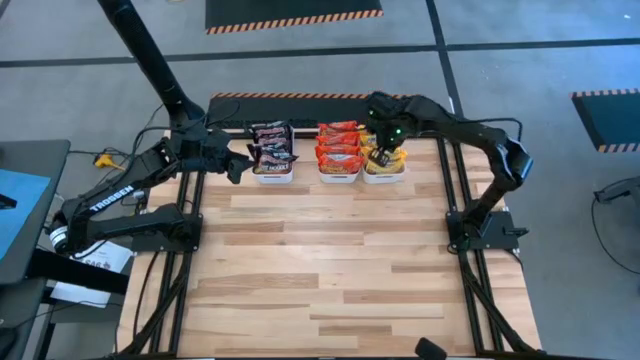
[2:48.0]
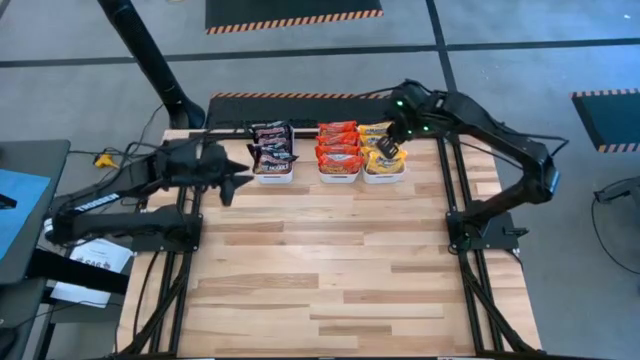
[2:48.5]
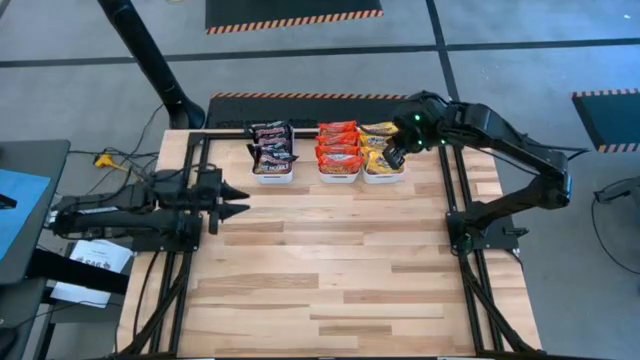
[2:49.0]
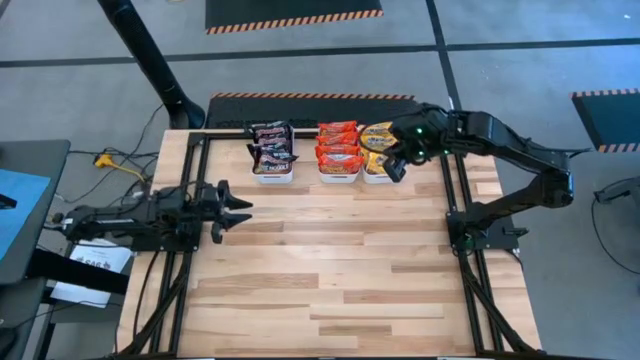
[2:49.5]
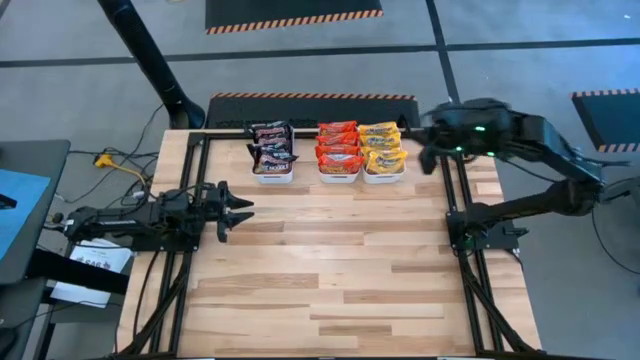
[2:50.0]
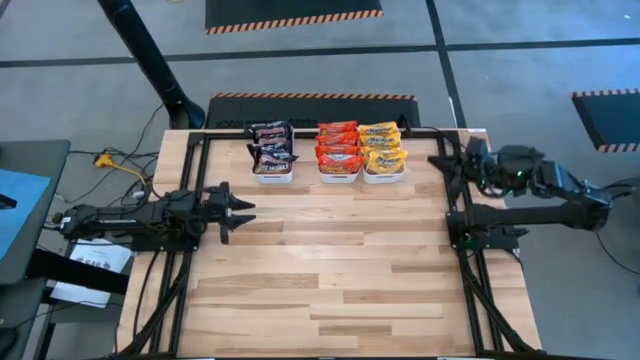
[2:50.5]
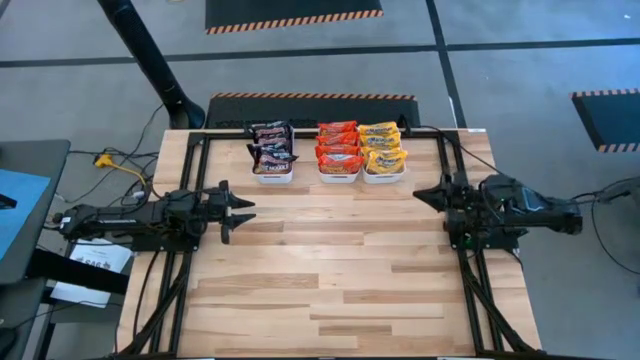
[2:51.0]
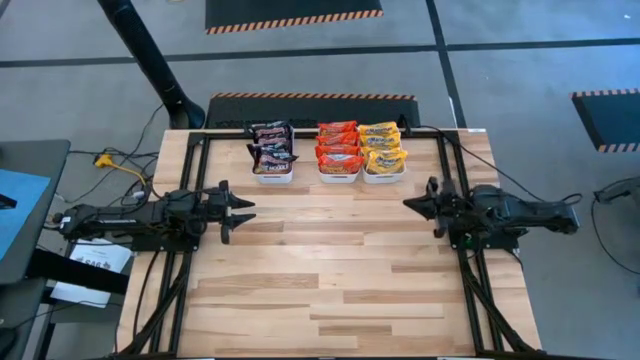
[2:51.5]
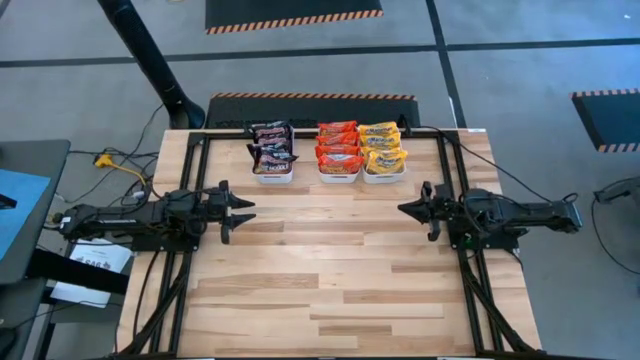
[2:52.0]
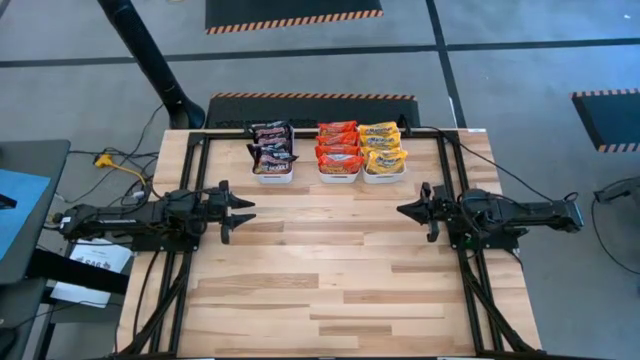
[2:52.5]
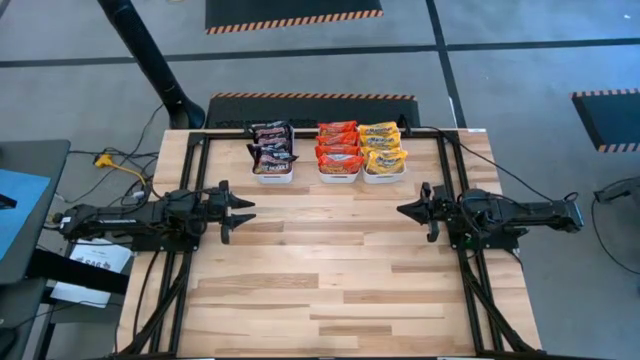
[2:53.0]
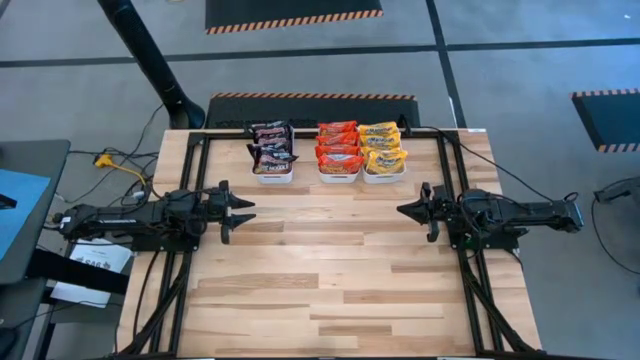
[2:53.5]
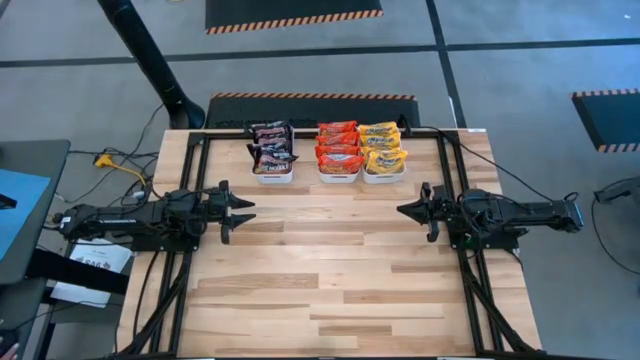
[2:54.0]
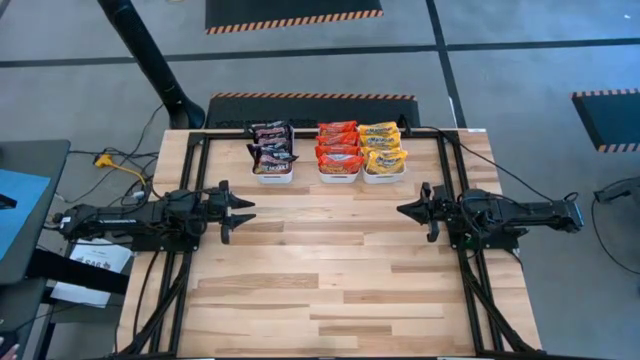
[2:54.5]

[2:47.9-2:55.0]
Task: Sort Maruchan noodles
Return to Home Position

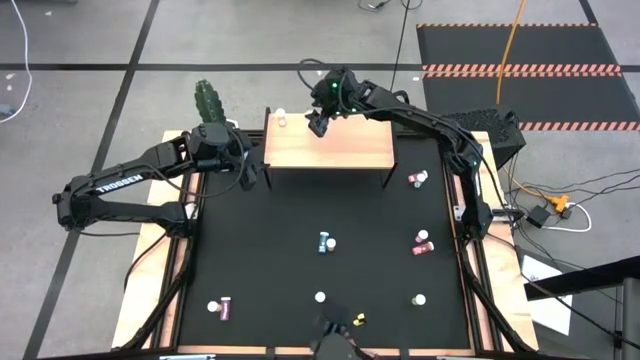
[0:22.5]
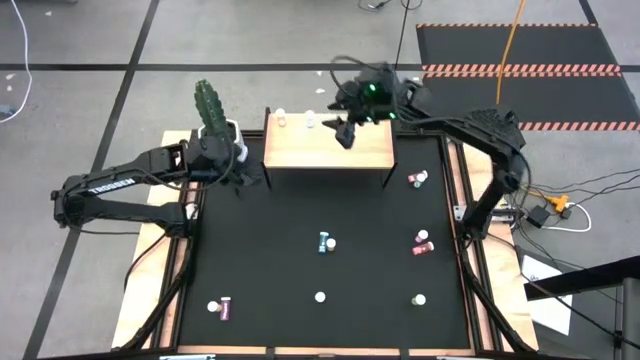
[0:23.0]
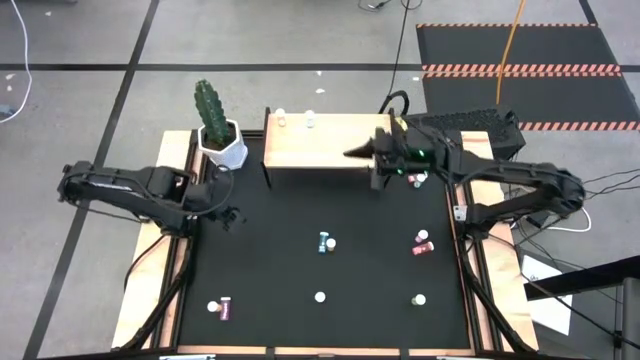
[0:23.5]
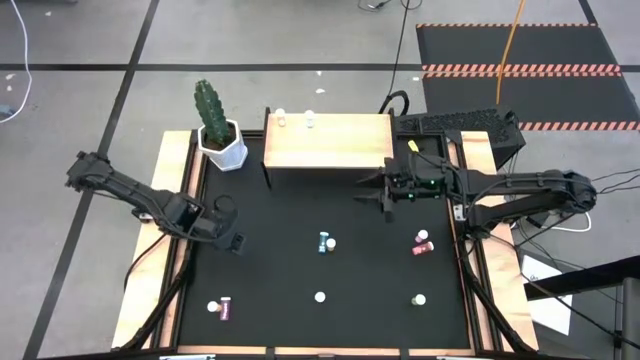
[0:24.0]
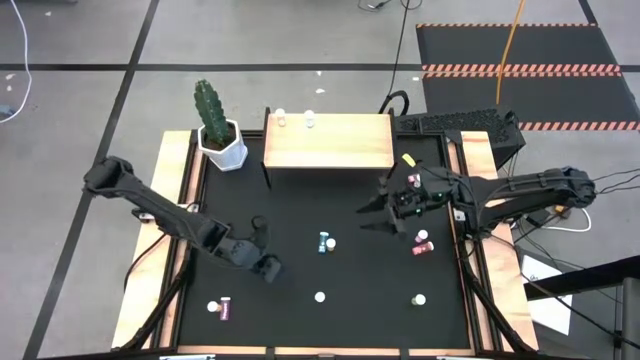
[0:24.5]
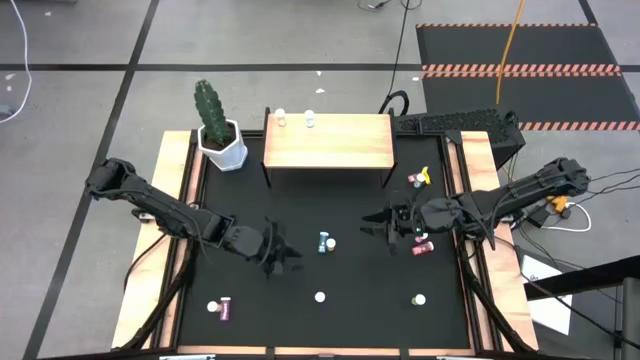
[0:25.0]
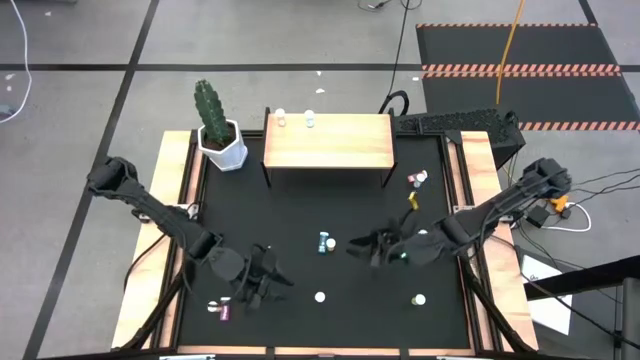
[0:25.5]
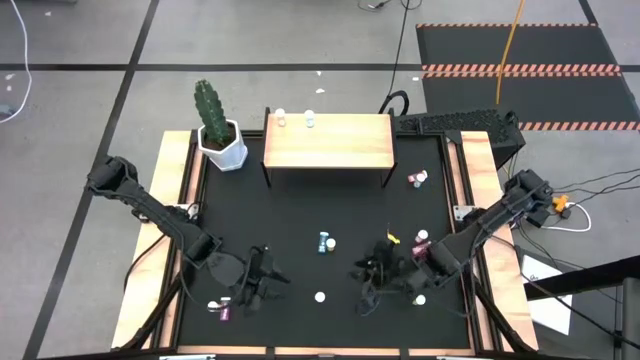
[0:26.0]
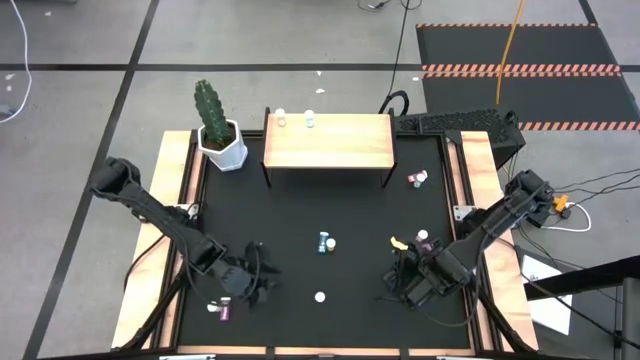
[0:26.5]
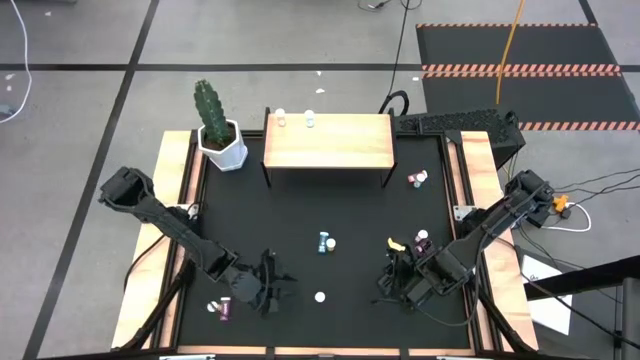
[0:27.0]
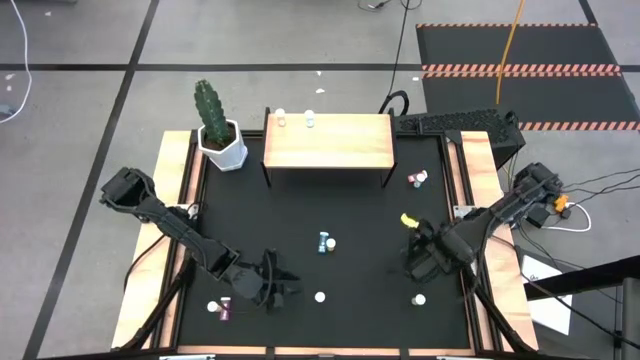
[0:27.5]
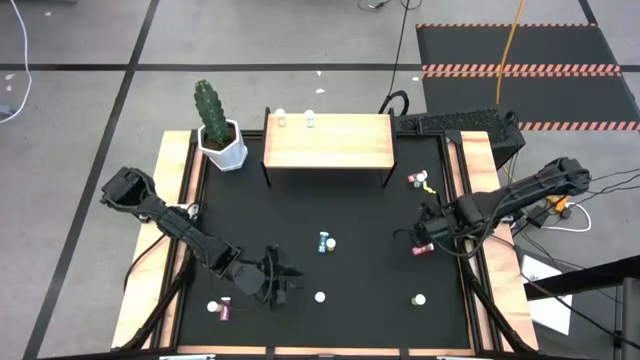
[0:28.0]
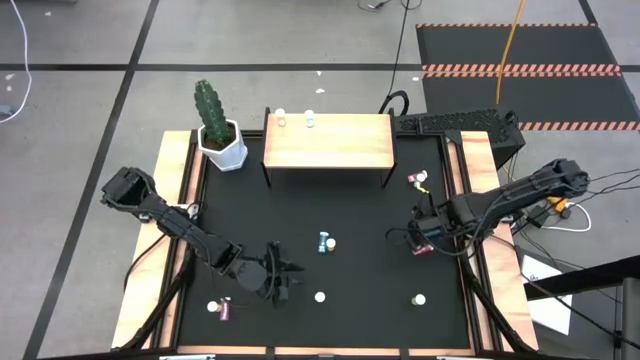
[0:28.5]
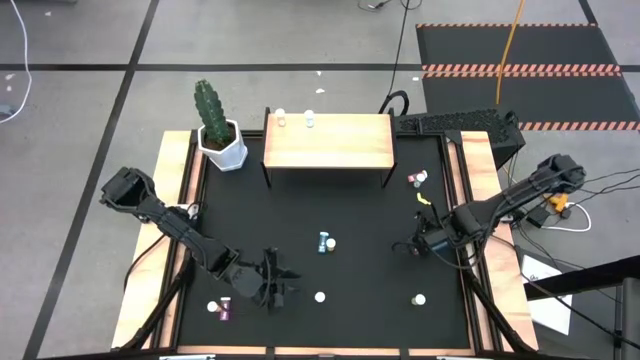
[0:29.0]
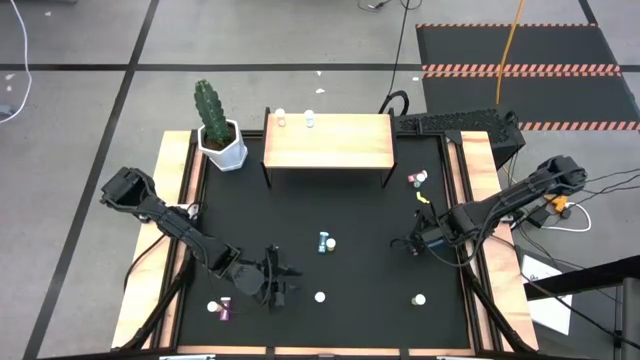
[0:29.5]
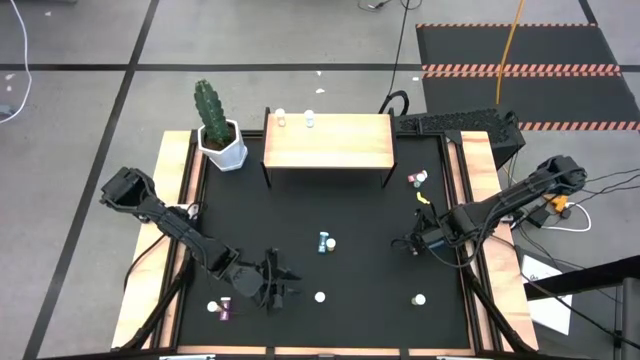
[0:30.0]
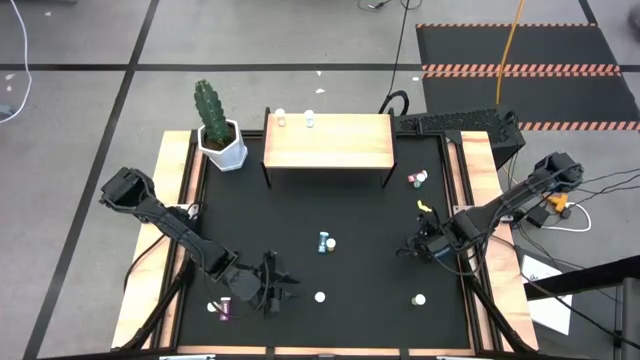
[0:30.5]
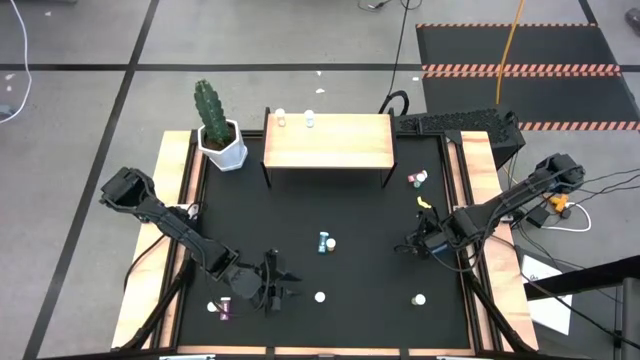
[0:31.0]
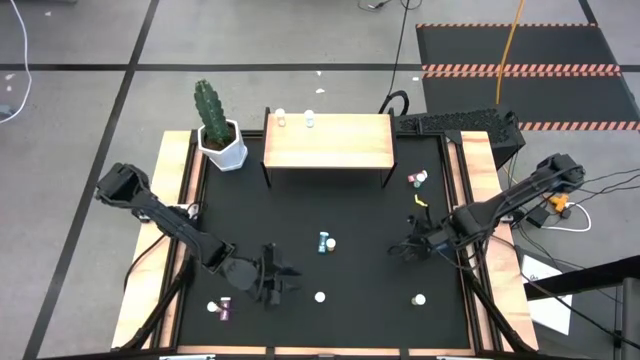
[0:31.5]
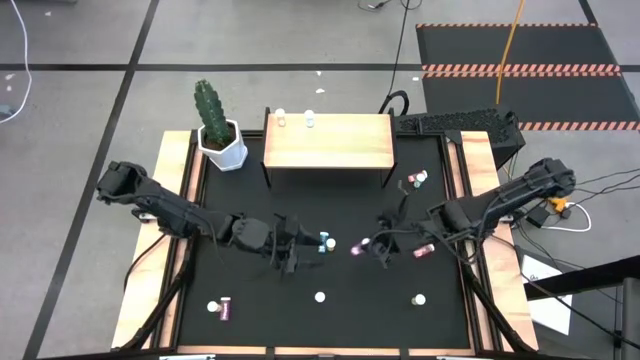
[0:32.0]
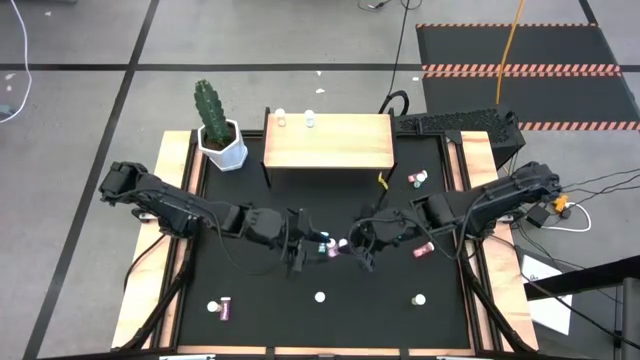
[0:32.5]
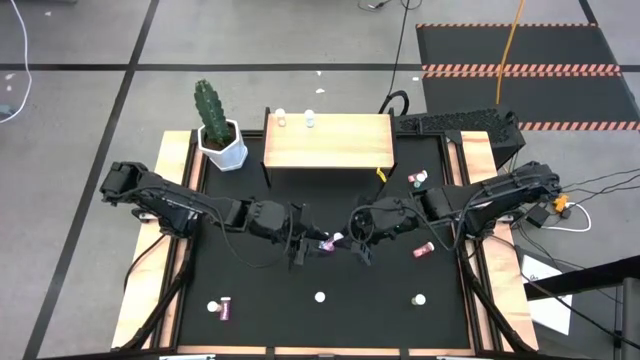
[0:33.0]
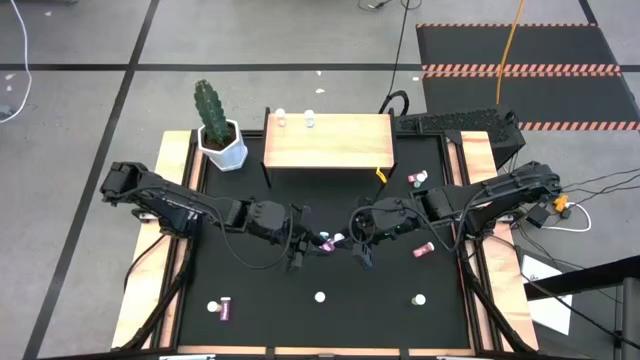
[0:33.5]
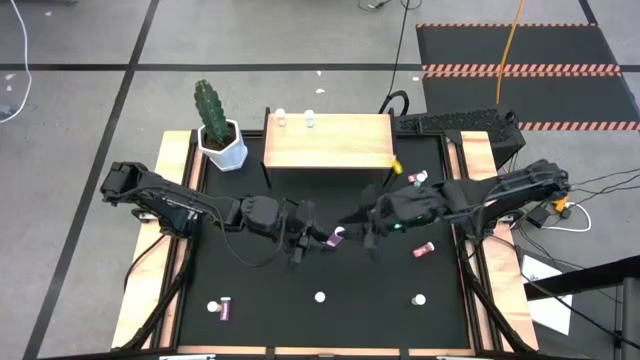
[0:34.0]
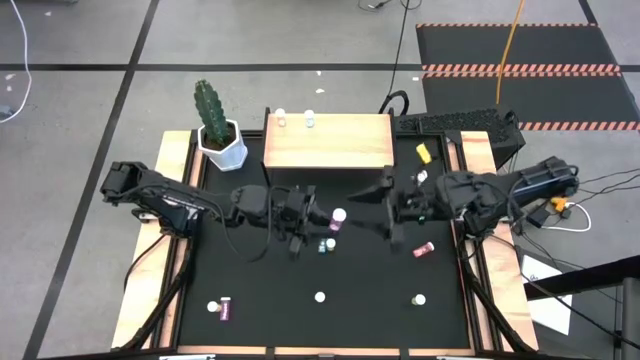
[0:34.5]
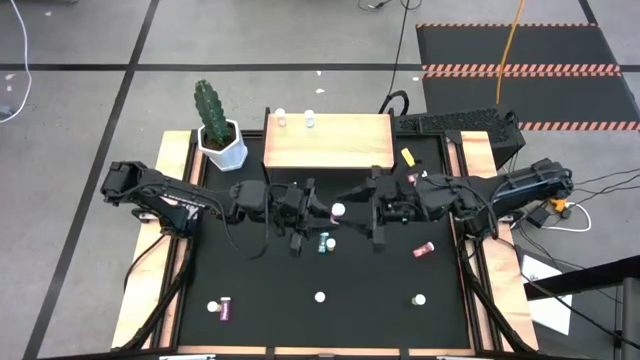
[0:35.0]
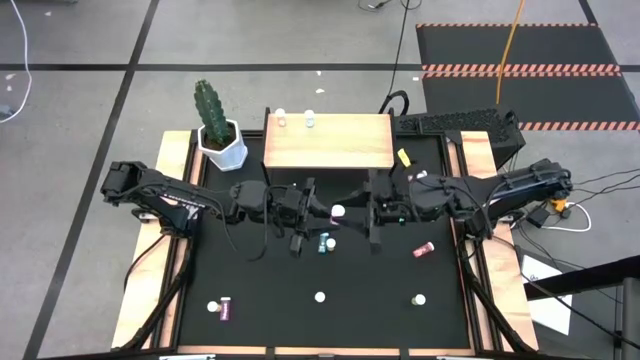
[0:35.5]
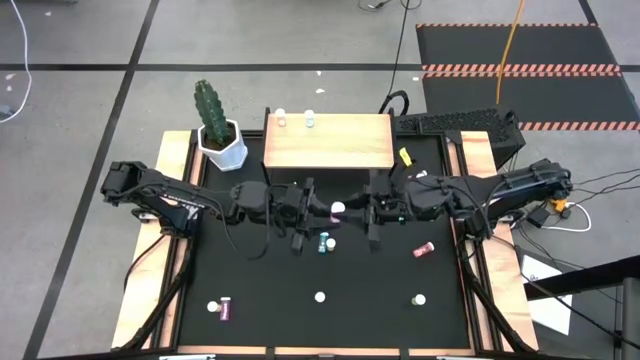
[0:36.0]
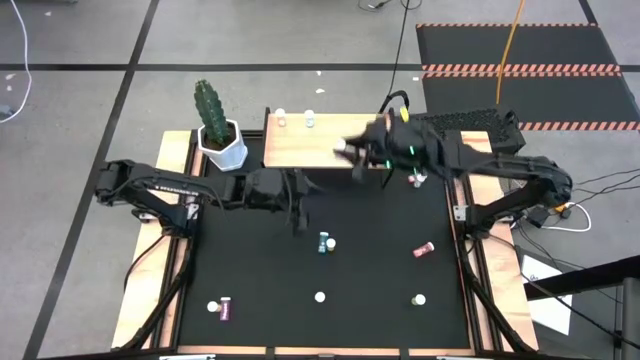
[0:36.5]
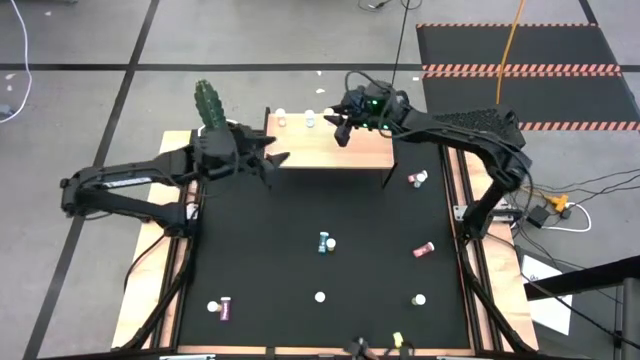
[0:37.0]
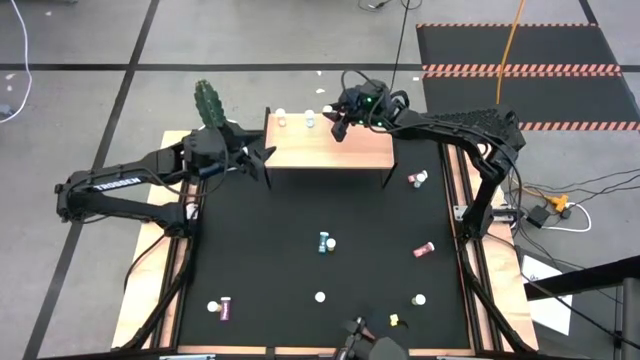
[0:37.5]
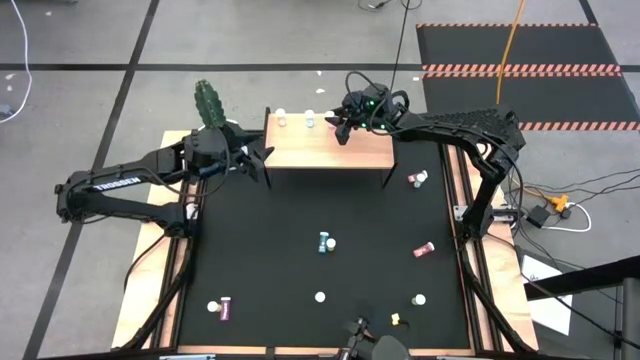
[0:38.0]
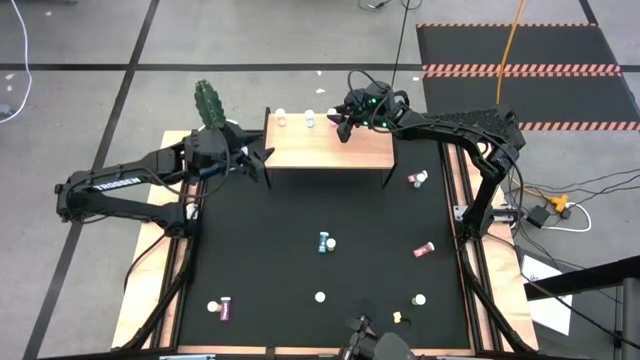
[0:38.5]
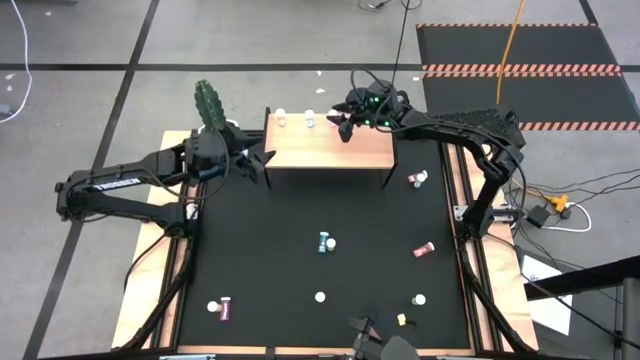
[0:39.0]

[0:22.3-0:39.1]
Task: Pick and place medicine bottles onto shelf by color
Put the top pink pill bottle on the shelf
